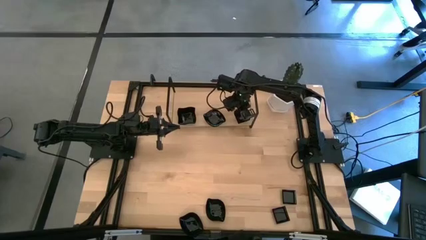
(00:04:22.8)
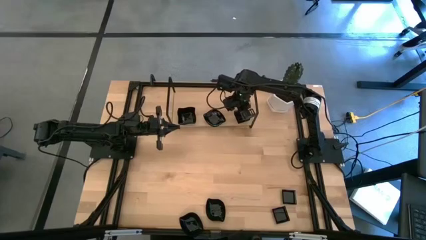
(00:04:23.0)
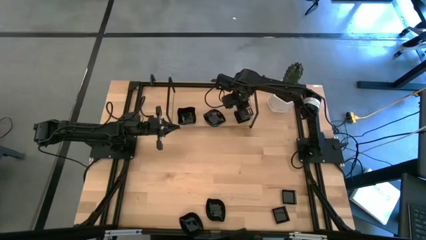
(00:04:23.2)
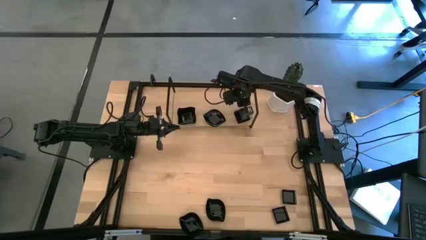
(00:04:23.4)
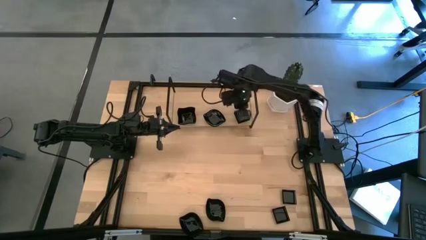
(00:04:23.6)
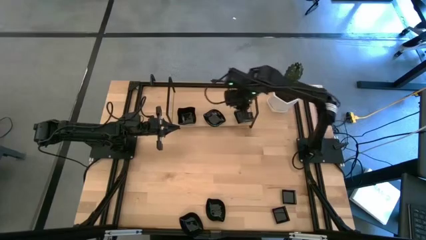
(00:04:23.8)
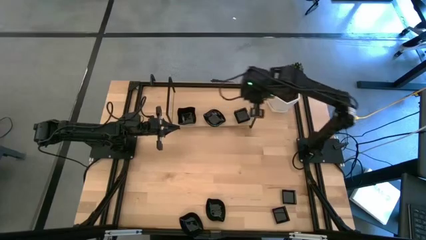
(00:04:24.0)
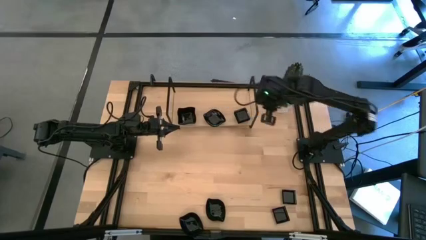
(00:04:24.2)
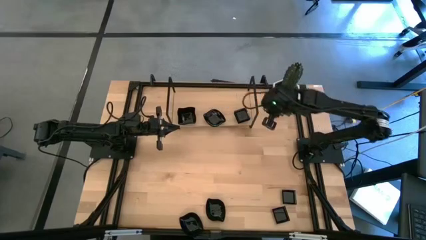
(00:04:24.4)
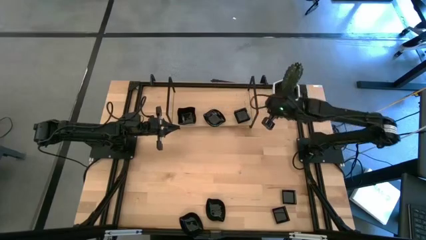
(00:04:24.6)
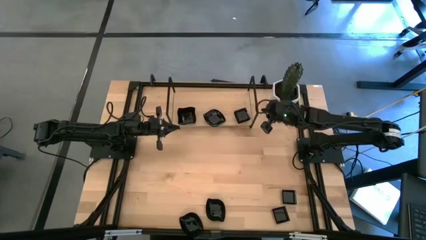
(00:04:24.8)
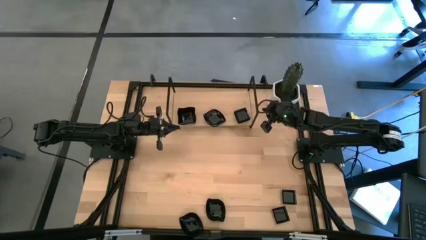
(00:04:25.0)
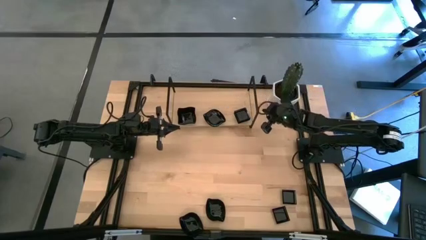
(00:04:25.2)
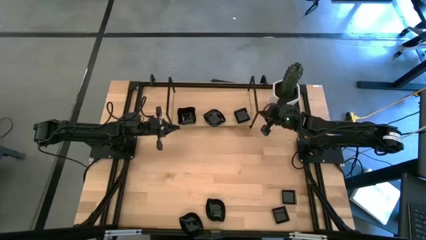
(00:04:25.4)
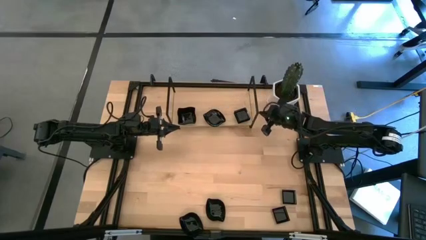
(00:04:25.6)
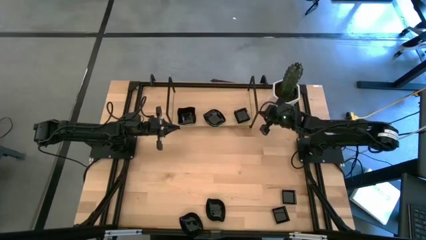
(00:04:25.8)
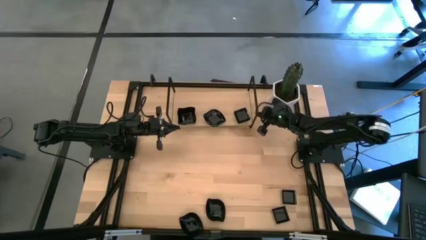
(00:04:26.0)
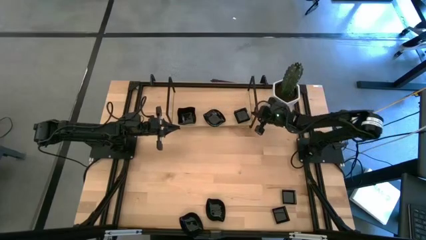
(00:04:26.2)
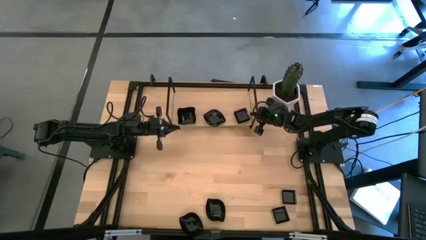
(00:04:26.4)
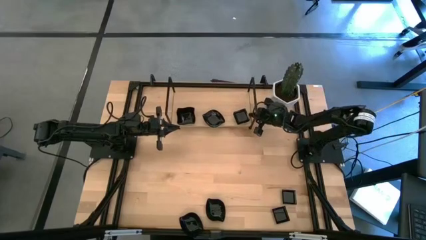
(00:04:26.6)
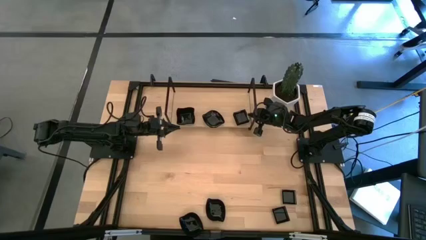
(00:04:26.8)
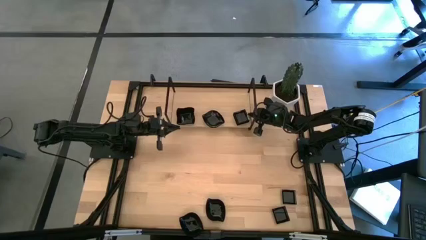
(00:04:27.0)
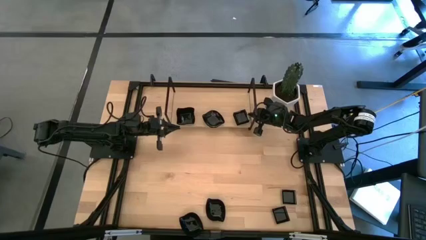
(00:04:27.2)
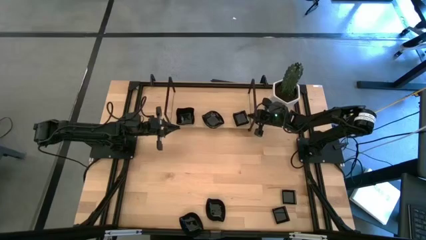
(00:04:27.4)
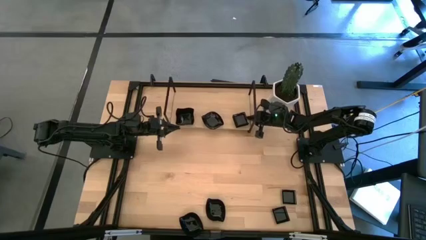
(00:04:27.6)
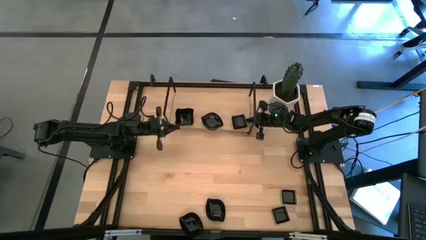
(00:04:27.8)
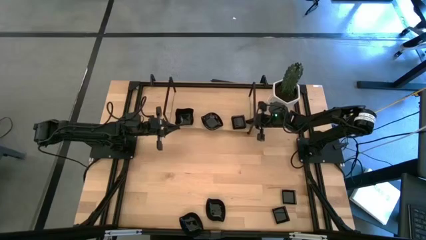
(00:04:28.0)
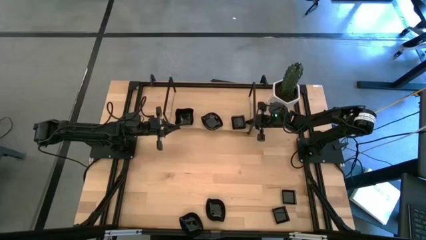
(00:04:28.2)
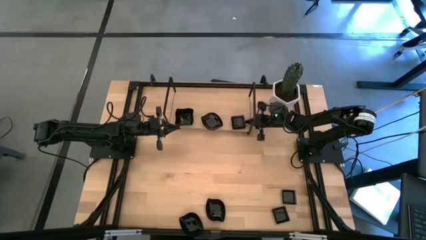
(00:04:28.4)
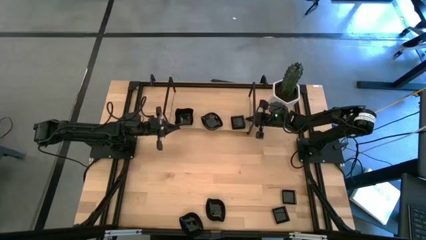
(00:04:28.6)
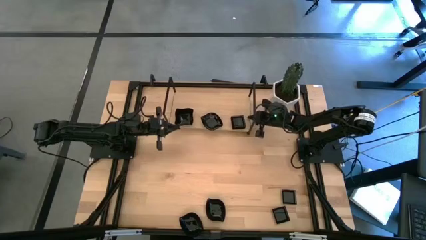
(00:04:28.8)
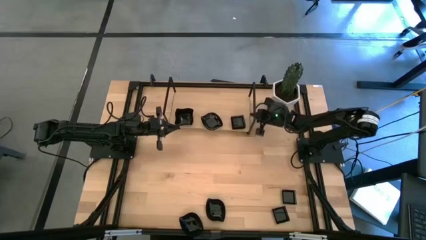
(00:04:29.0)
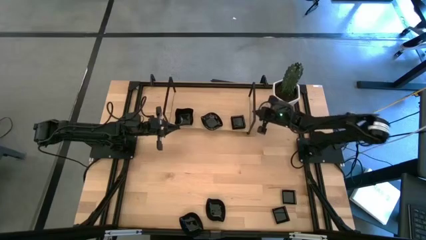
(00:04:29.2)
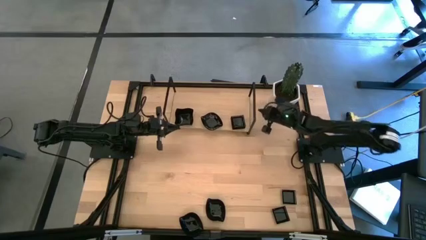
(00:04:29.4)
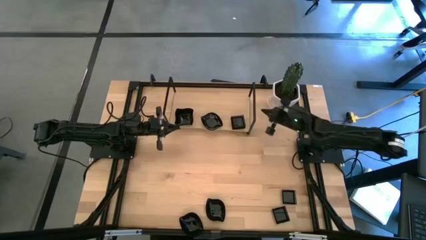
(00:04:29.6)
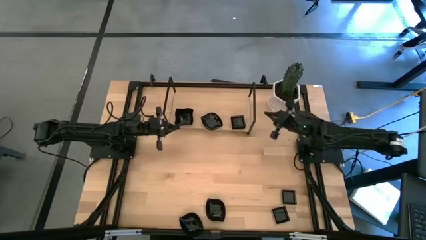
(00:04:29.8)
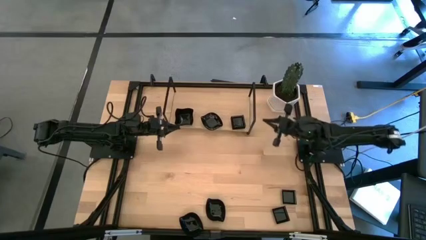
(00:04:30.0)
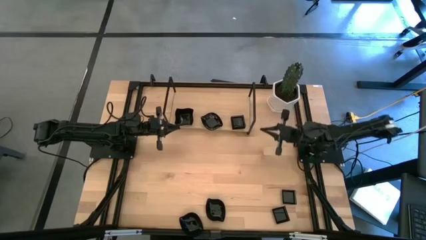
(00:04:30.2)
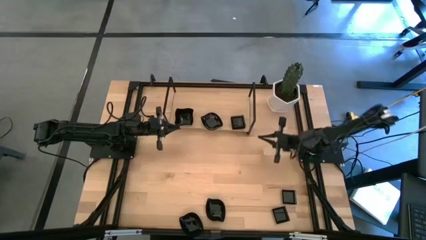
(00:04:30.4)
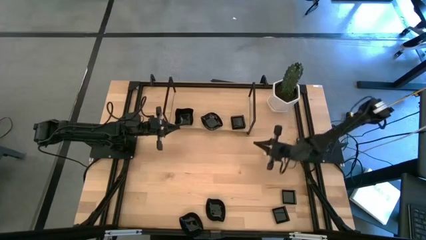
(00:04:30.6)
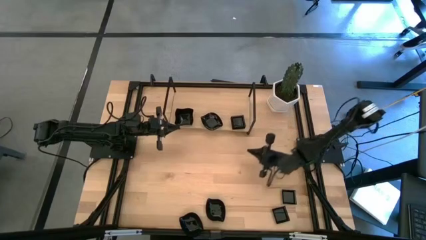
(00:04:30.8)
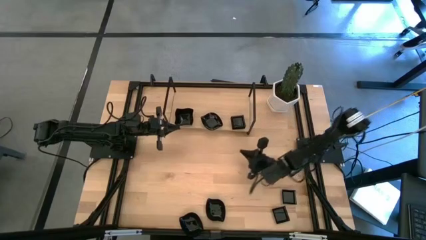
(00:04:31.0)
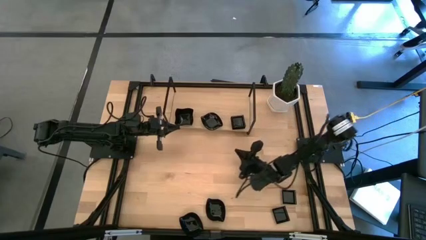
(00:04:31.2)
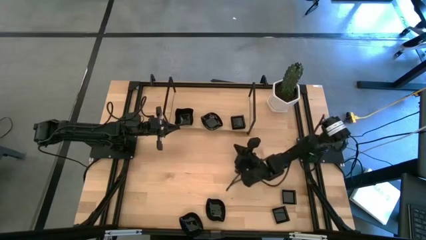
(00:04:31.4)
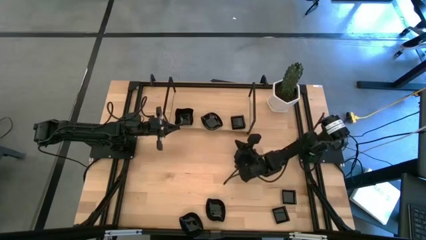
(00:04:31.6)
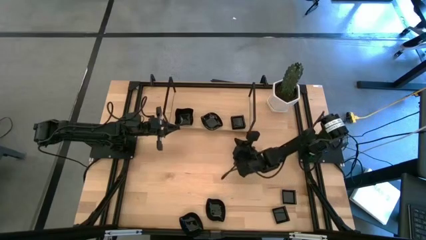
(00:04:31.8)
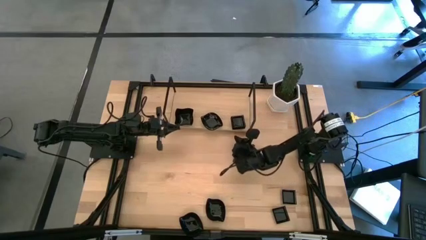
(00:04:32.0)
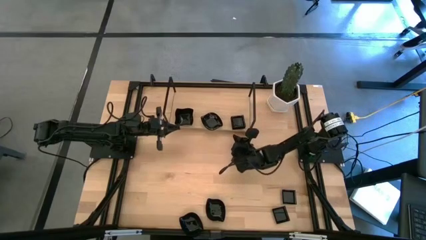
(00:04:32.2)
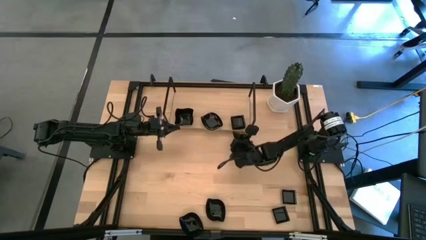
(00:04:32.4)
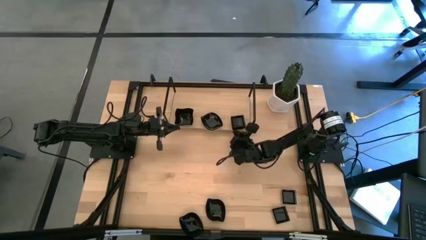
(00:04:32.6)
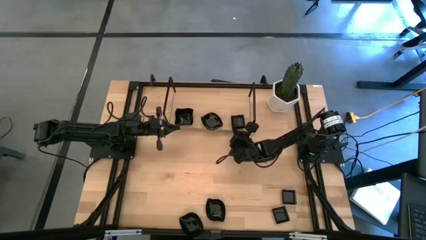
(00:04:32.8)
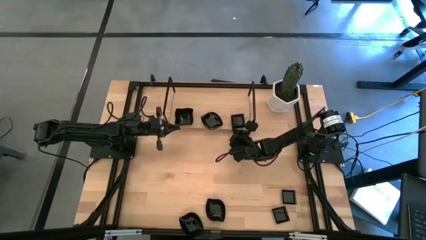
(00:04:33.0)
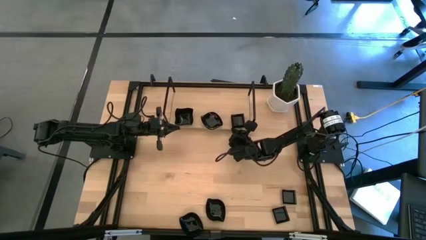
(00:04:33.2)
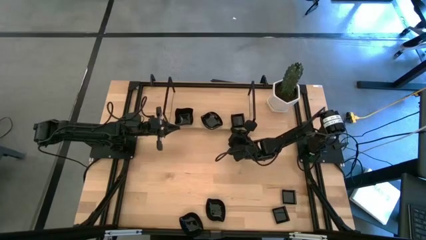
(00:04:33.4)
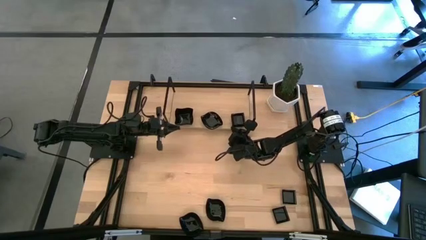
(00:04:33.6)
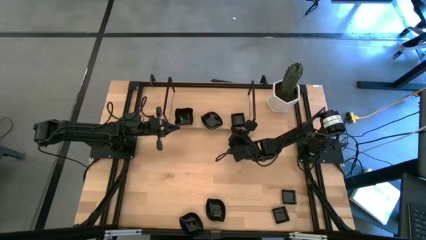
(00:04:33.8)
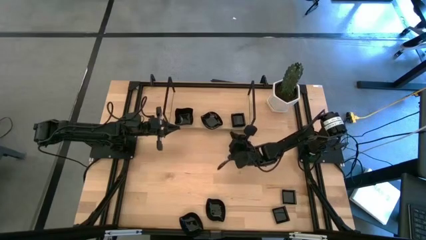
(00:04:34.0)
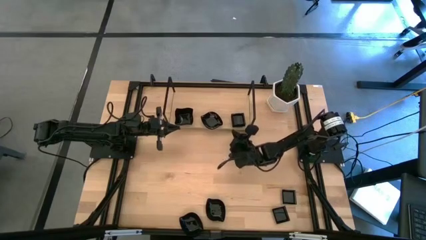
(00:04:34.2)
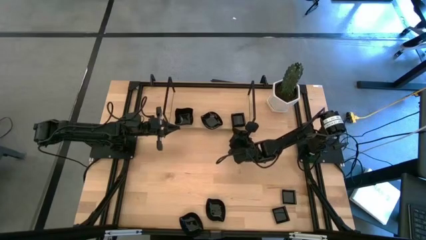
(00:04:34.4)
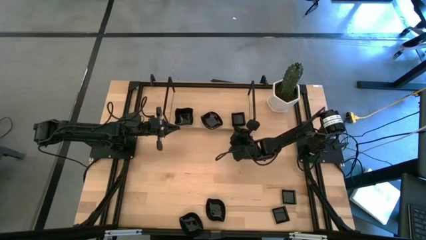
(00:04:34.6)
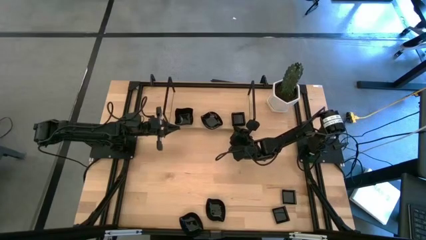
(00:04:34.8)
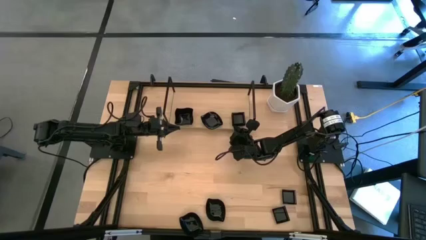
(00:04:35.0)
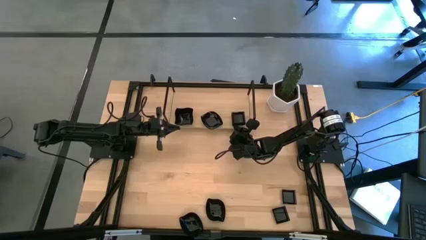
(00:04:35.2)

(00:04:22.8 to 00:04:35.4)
Task: Pick & Place Mini shaped plates
Adjust the black square plate on the shelf

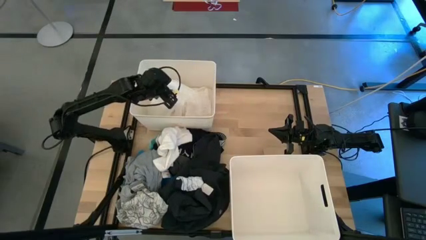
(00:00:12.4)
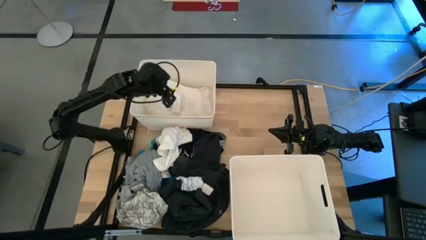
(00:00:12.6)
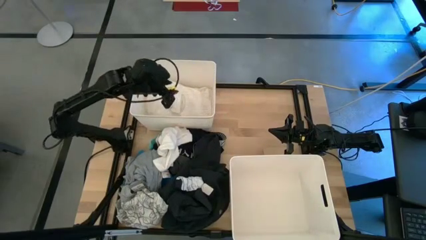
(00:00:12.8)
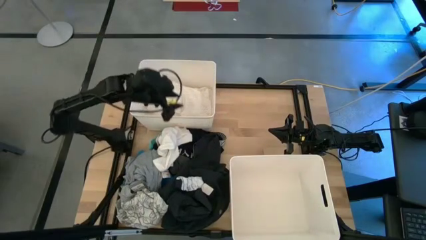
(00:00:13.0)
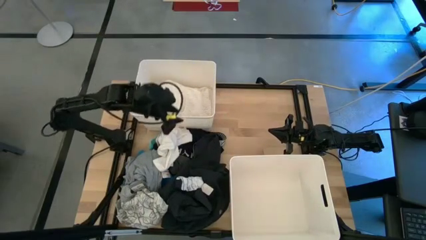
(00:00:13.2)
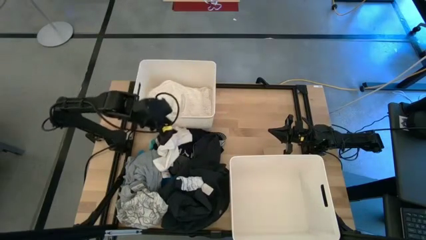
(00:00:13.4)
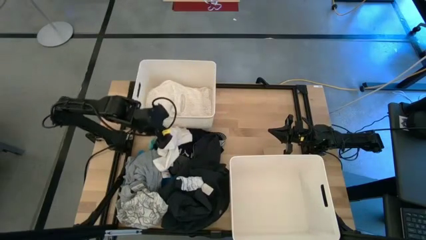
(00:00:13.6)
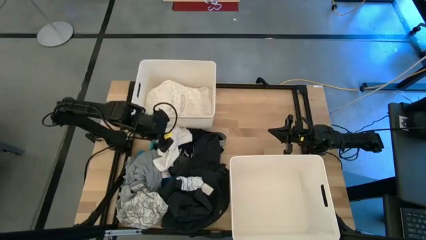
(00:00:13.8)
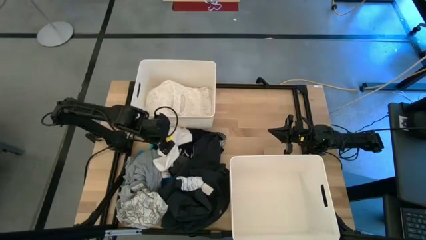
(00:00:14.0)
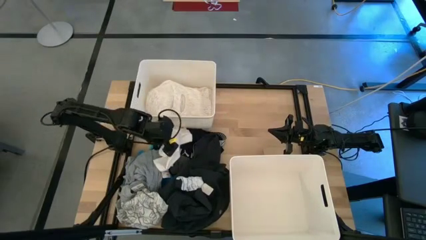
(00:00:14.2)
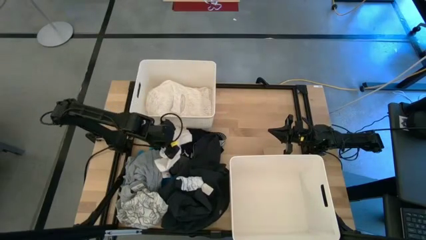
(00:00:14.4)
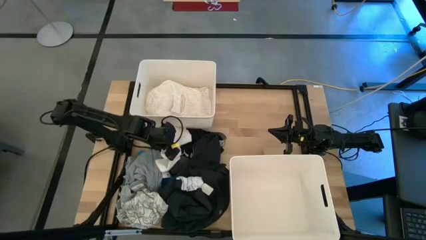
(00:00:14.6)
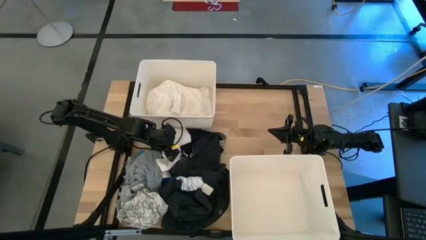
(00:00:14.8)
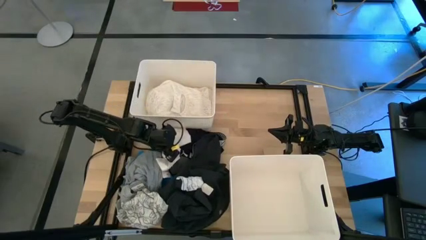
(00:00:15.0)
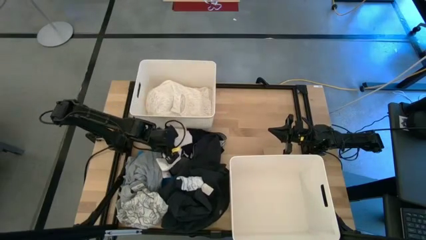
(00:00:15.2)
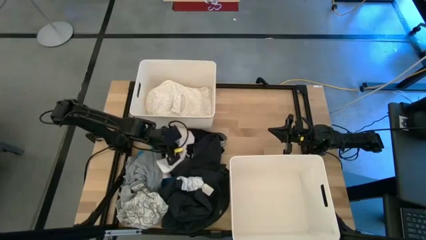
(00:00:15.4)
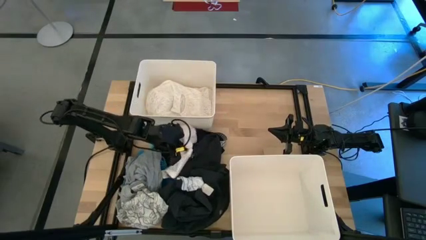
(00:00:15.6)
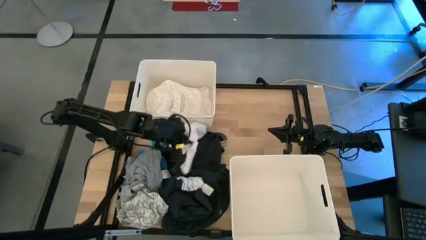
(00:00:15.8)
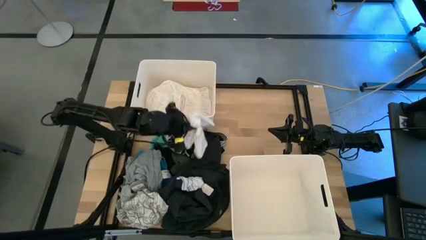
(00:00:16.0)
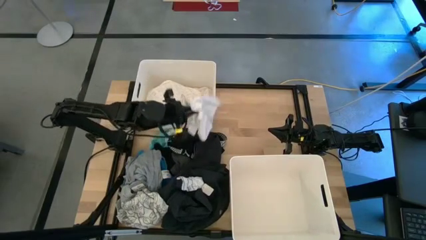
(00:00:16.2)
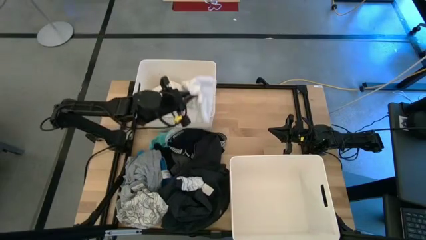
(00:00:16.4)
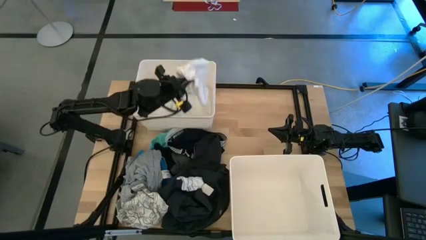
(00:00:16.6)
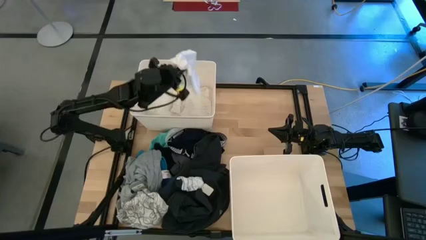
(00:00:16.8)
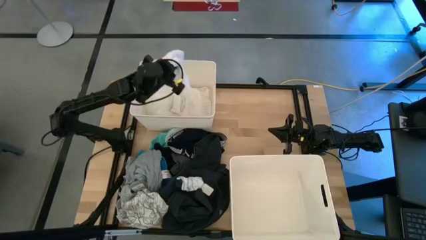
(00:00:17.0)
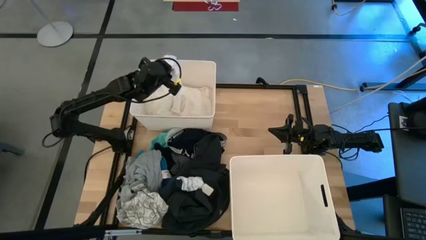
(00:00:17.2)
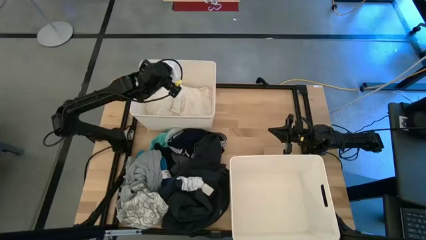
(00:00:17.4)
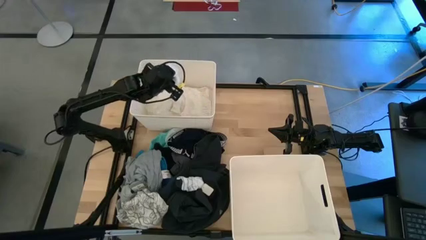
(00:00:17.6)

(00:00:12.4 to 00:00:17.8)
Task: Sort clothes
Put the white shirt into the top left laundry bin
